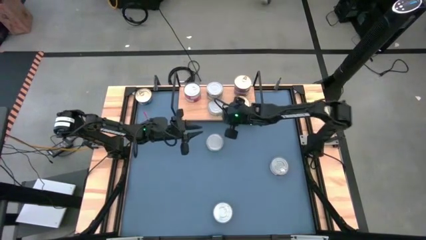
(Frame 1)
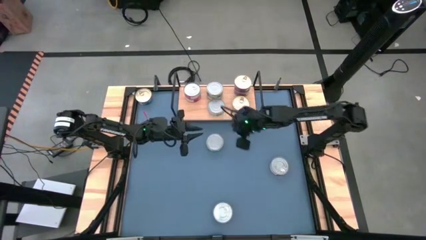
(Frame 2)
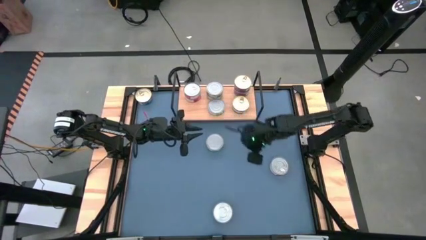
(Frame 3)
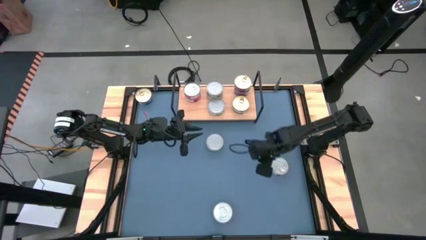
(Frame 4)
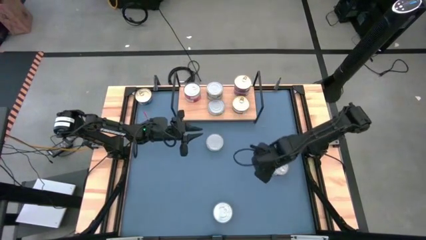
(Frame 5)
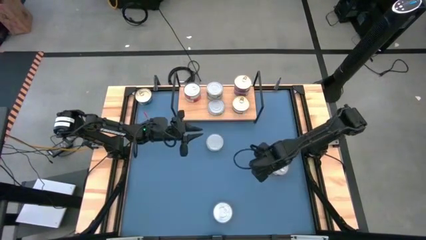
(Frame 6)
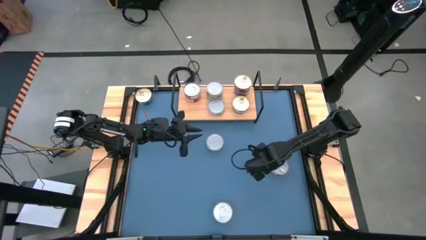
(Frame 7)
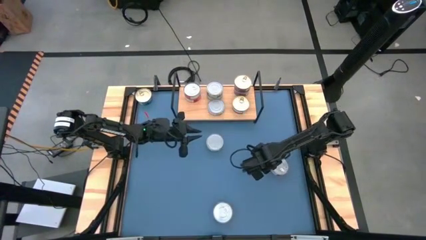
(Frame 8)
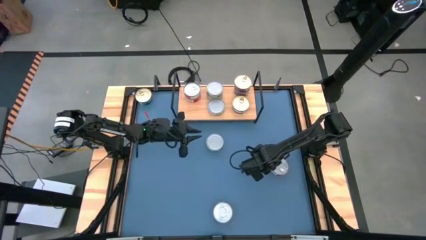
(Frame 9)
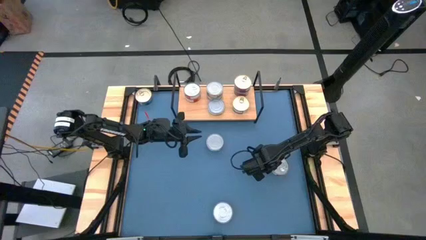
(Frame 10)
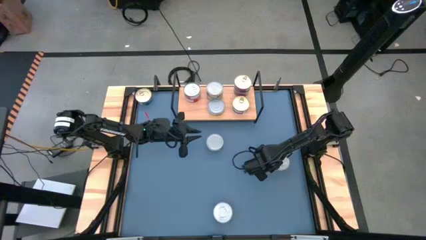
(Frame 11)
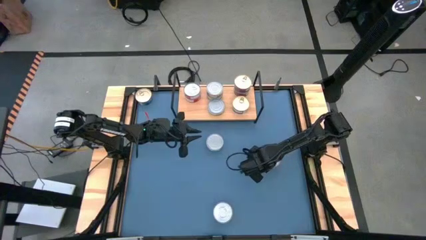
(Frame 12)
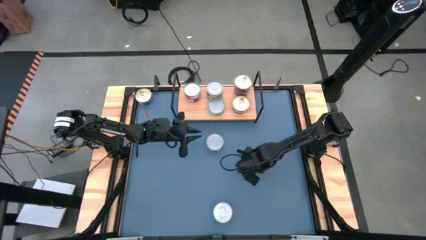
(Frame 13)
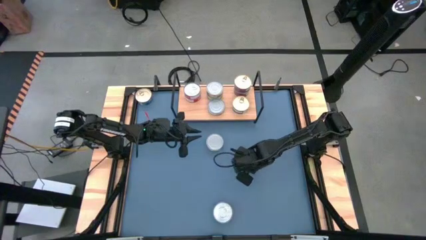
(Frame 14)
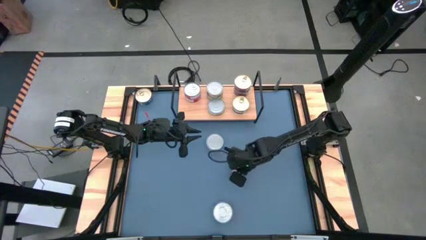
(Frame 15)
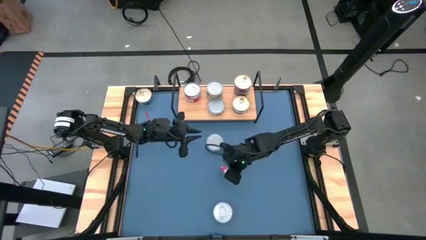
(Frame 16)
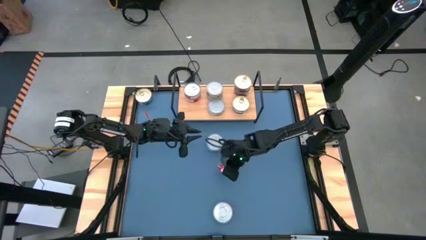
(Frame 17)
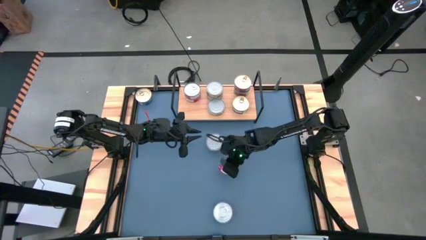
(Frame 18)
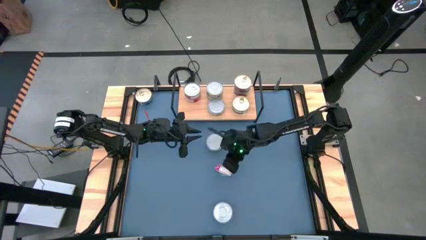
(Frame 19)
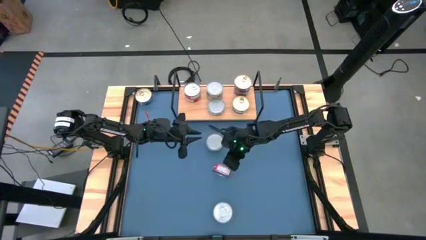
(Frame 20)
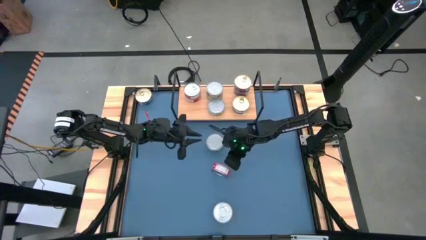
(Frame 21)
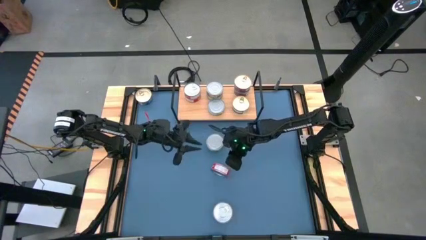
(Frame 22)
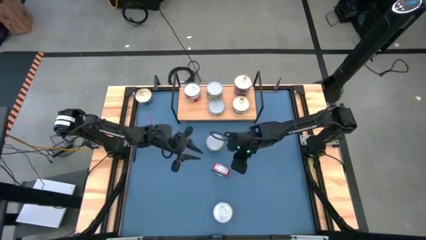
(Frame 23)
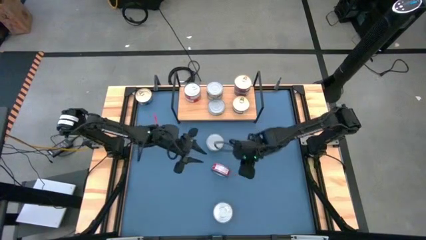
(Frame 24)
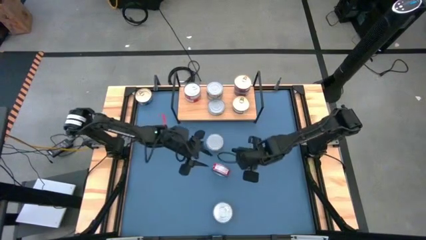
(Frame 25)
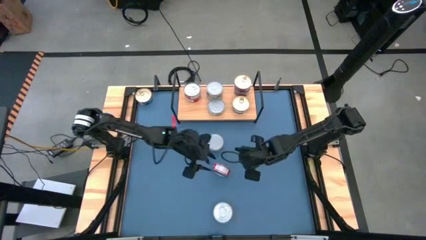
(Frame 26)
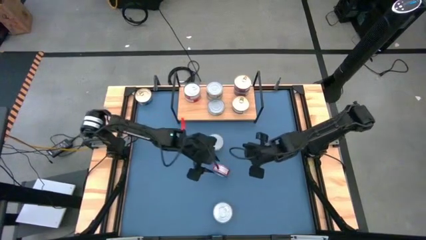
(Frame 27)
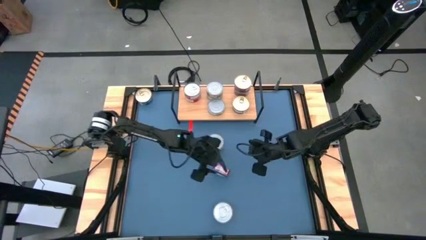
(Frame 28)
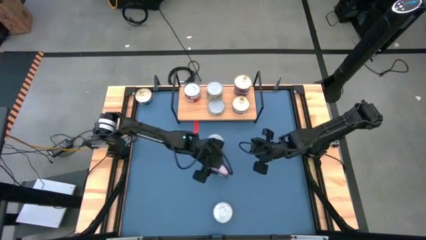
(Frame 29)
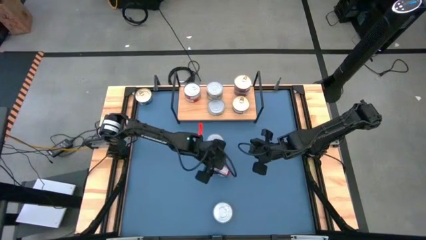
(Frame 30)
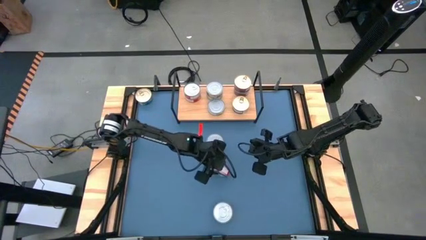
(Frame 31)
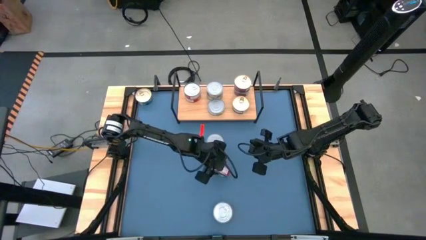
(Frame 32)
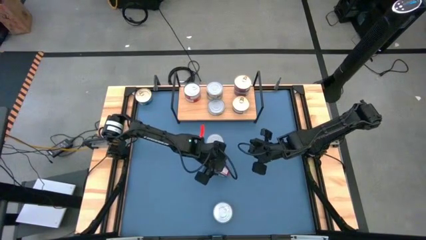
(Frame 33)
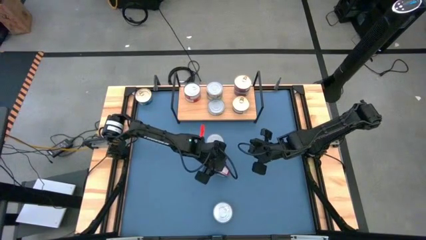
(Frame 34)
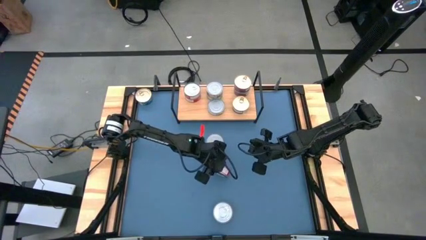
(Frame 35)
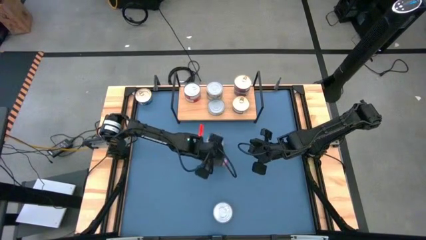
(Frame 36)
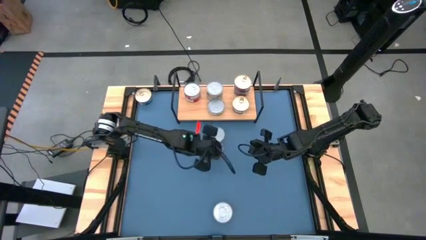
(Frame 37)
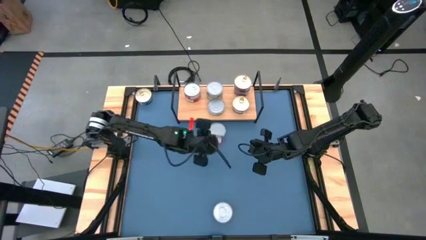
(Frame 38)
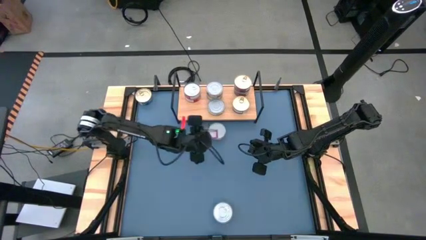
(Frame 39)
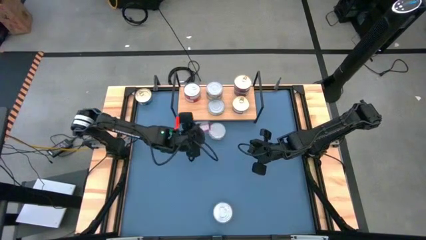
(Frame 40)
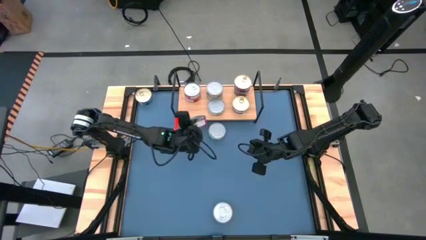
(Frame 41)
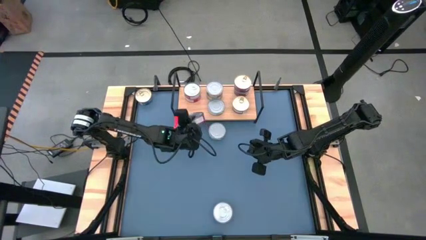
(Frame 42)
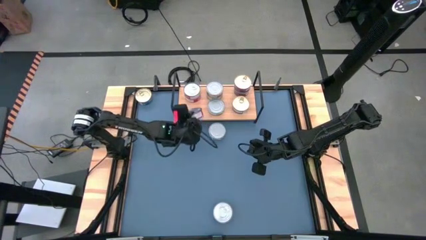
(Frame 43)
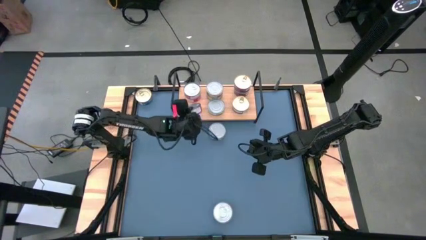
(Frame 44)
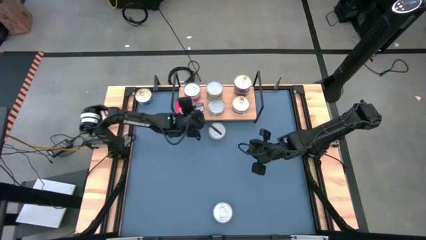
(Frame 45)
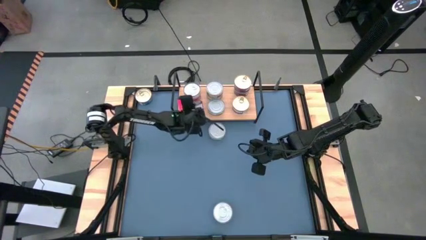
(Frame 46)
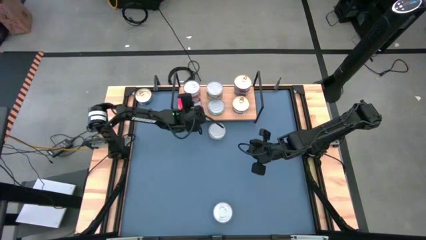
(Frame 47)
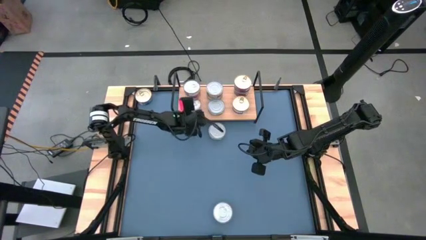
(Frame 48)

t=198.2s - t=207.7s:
Task: Stack canned seafood by type on shelf
Put the red tuna can on the shelf aligned with the stacked red tuna cans

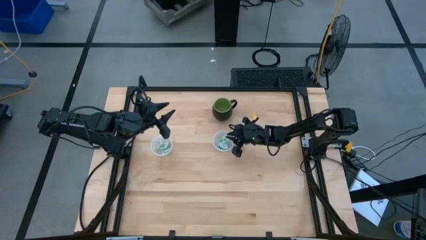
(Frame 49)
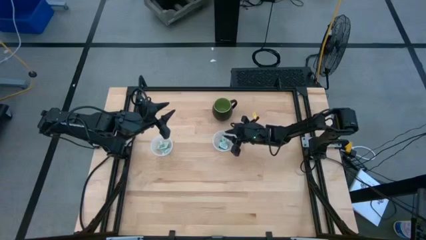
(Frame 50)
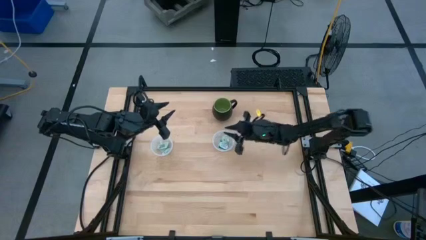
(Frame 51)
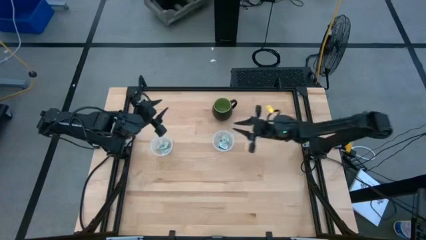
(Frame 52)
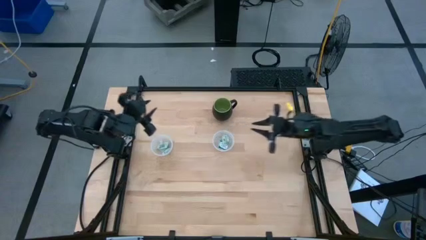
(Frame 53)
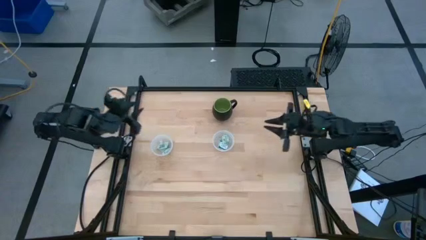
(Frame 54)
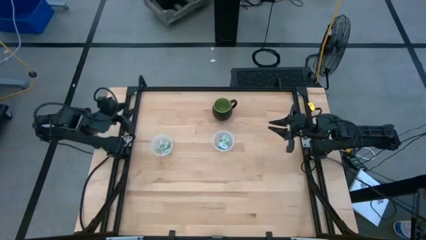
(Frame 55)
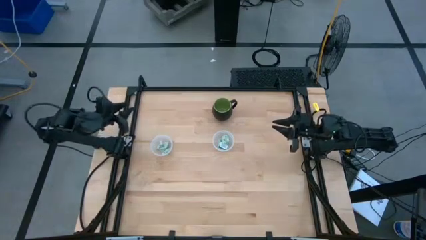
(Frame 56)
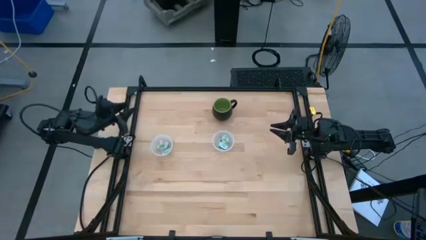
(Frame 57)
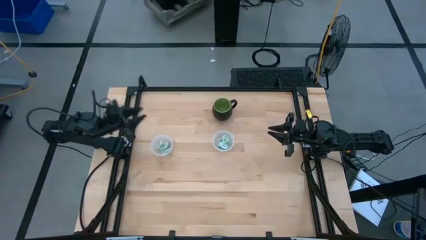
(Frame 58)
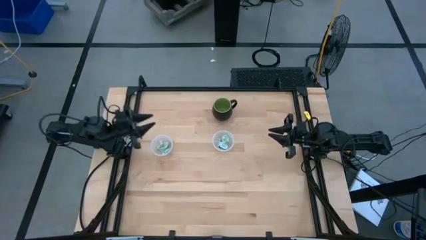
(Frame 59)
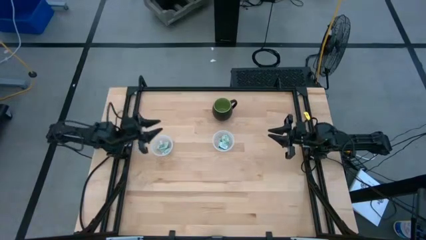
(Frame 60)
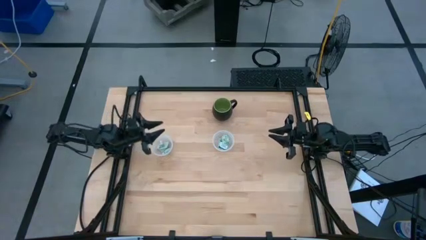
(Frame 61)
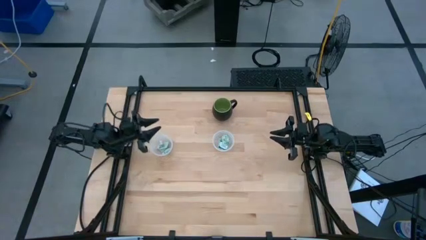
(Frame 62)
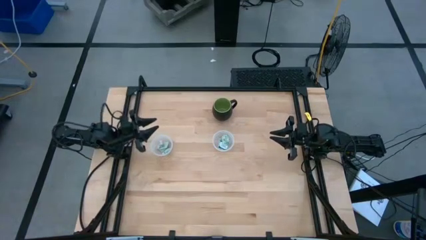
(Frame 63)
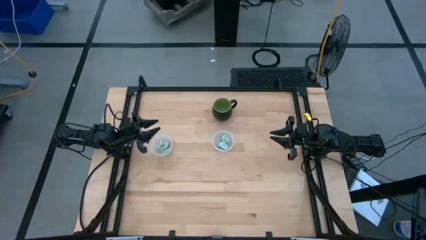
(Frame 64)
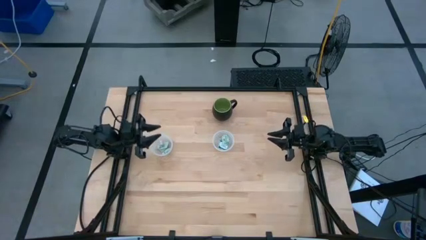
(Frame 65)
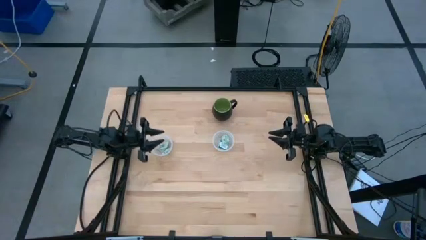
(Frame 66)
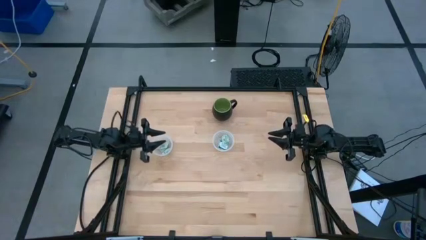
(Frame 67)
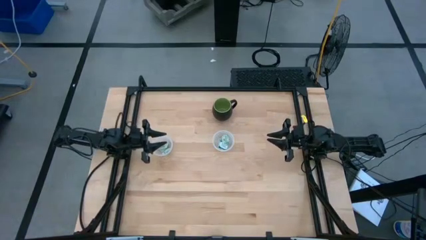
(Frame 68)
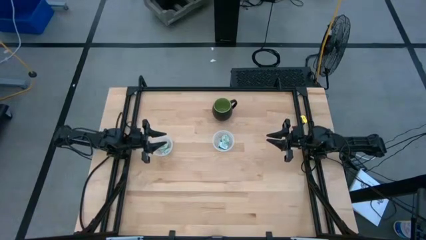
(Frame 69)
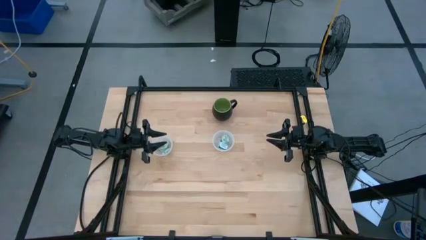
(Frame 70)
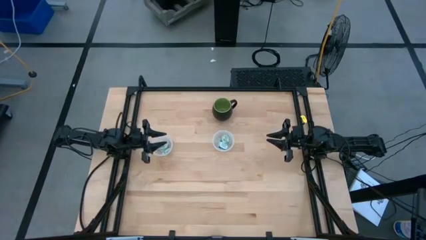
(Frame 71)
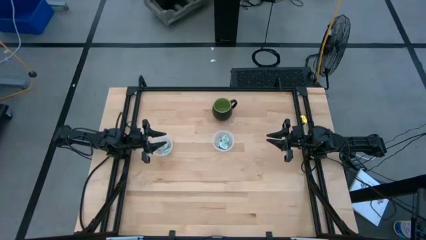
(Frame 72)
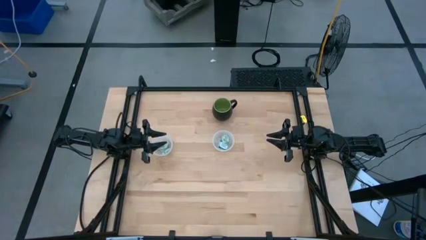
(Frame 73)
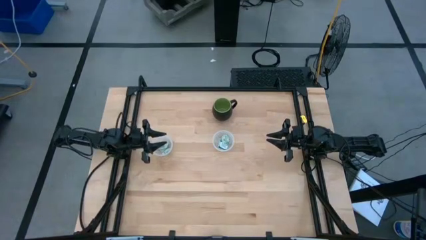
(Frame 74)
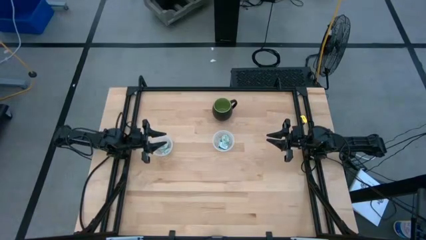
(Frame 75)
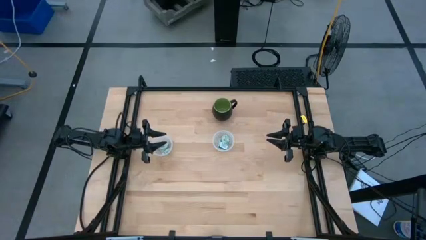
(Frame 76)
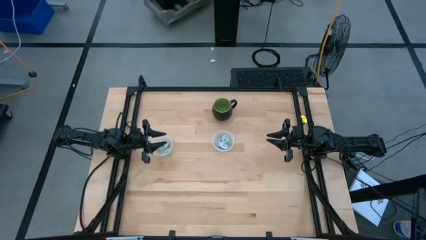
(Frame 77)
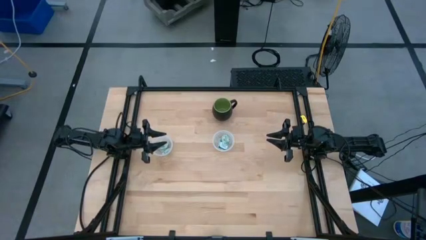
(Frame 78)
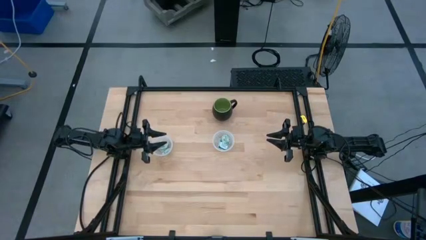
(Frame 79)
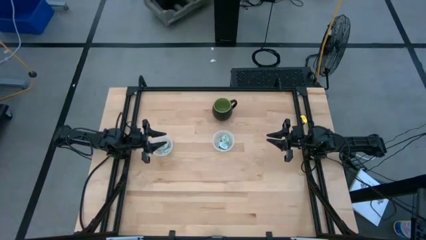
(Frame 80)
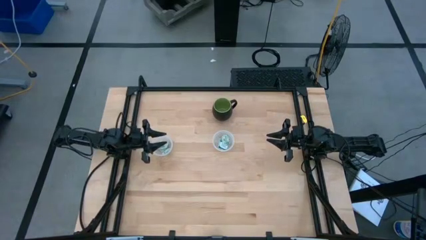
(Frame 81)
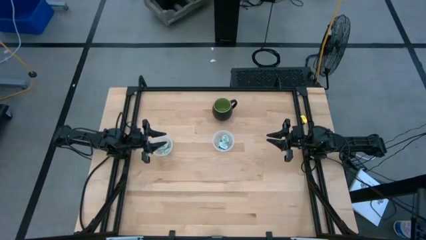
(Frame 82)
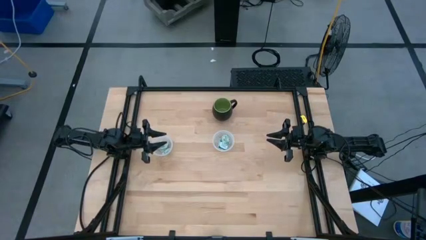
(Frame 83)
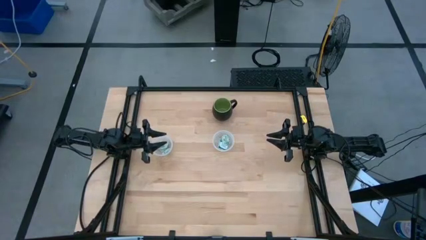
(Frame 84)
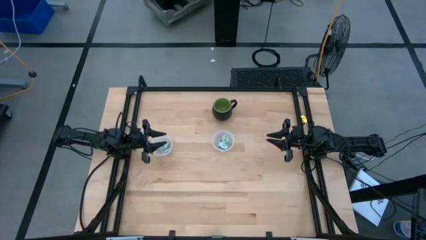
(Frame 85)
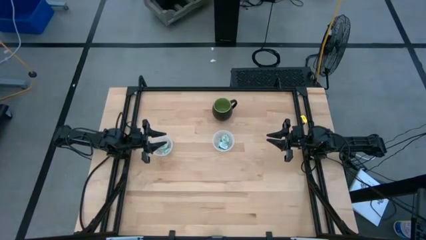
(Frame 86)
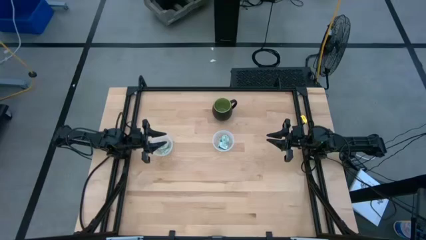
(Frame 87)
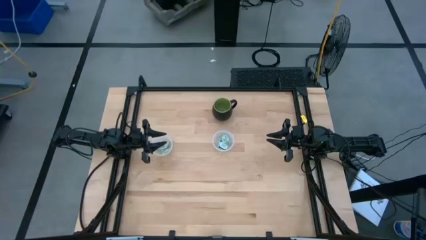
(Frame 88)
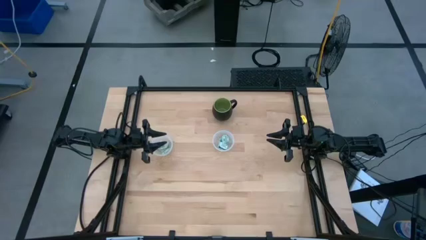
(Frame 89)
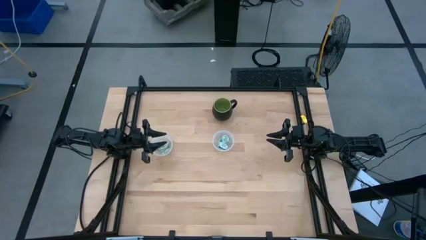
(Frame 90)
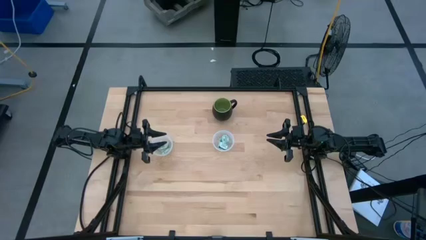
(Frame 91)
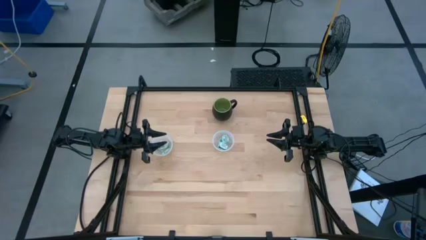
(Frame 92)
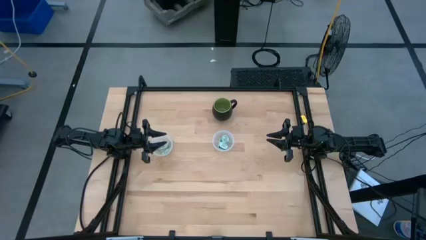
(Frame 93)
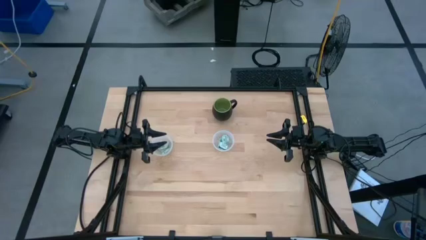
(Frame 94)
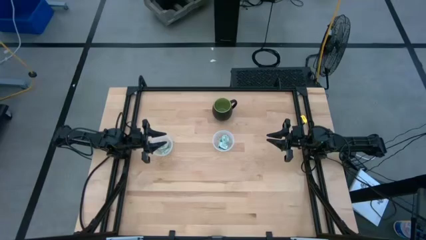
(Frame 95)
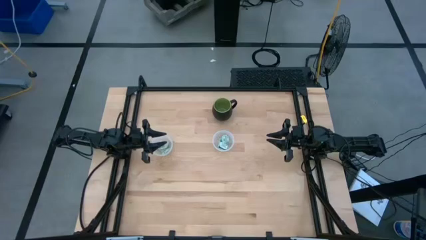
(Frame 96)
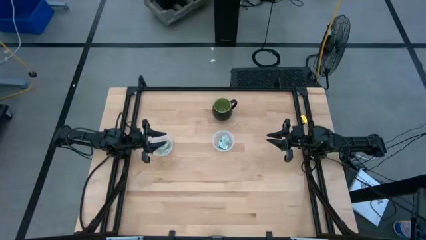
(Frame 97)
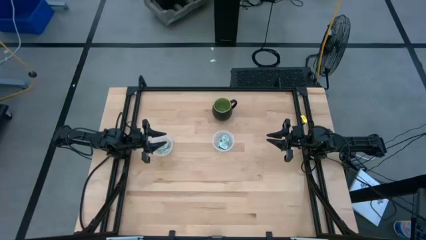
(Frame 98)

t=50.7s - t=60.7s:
Task: Pick and place Stevia / Truvia into bins
Return to Home Position
